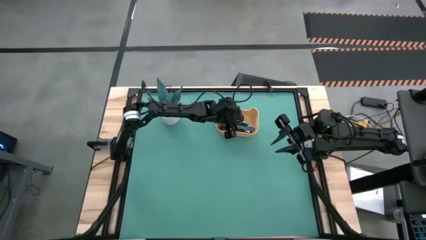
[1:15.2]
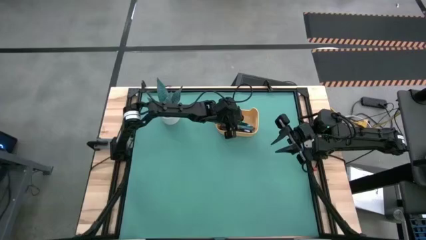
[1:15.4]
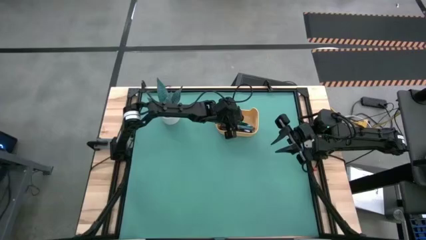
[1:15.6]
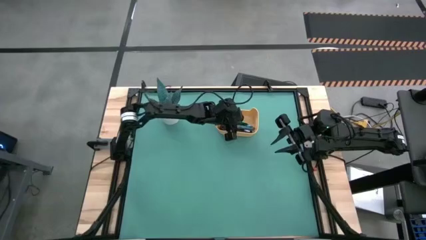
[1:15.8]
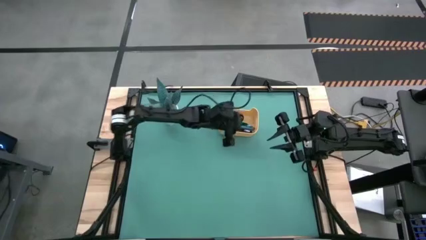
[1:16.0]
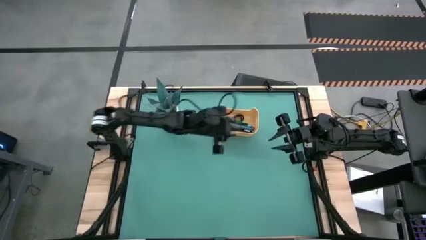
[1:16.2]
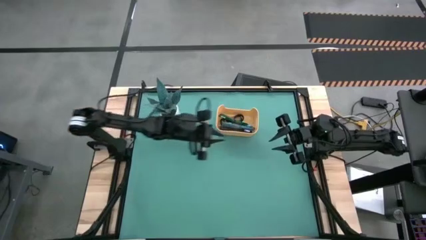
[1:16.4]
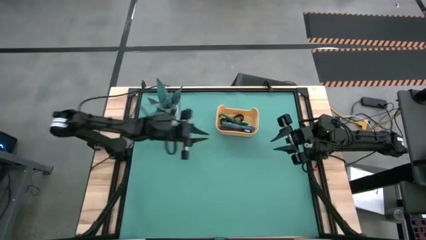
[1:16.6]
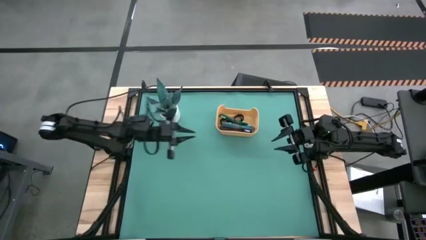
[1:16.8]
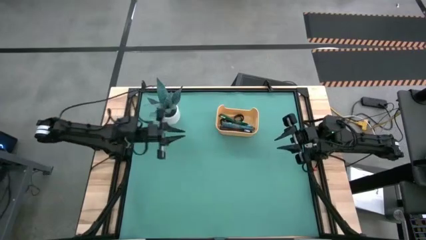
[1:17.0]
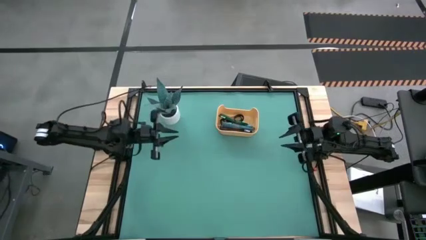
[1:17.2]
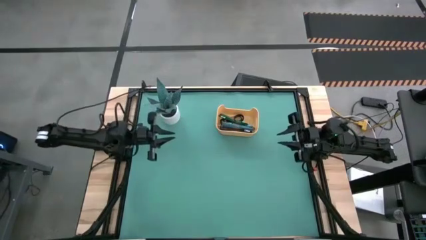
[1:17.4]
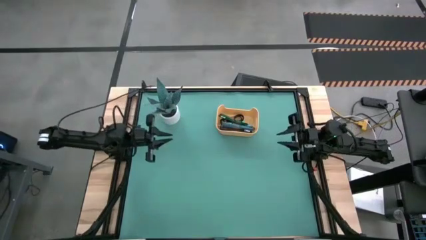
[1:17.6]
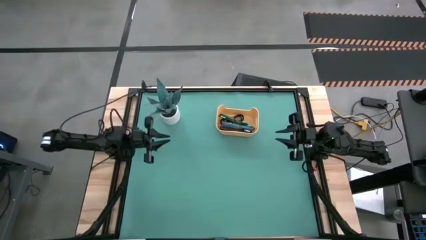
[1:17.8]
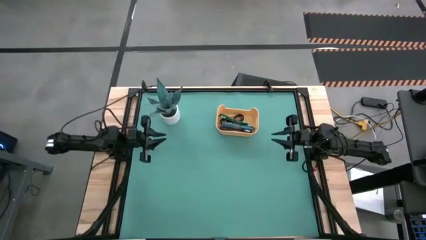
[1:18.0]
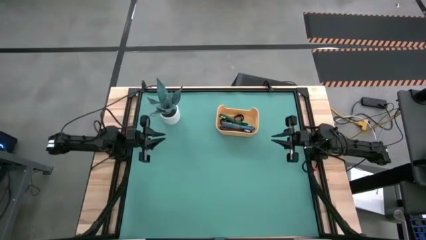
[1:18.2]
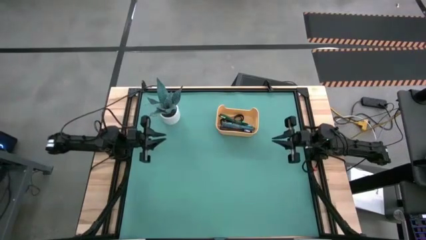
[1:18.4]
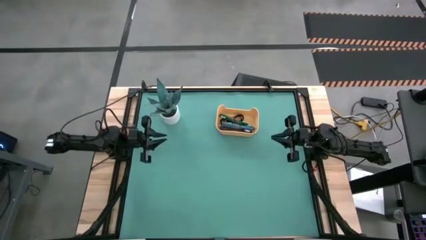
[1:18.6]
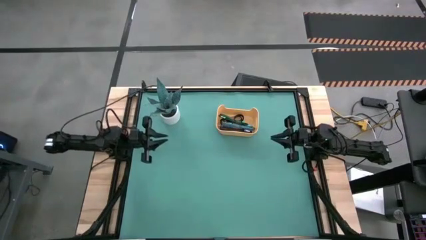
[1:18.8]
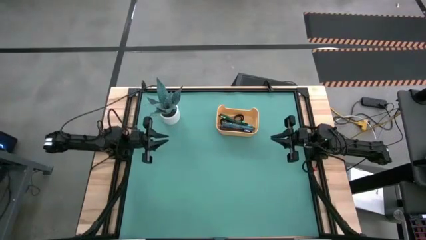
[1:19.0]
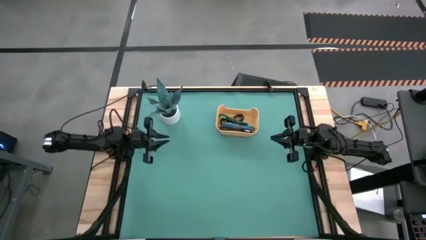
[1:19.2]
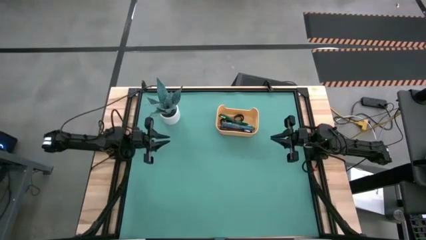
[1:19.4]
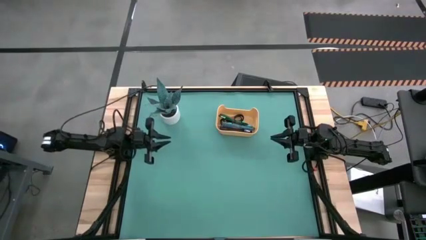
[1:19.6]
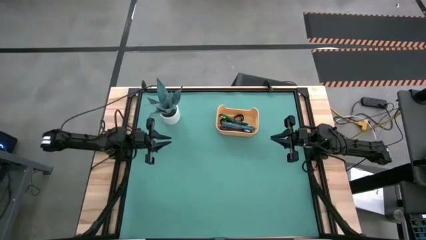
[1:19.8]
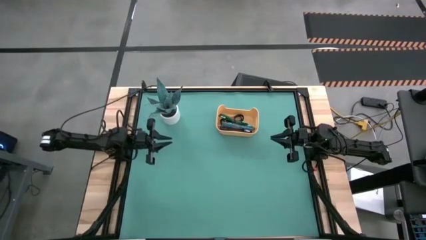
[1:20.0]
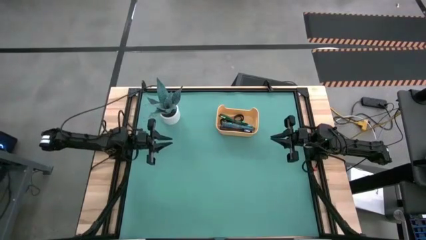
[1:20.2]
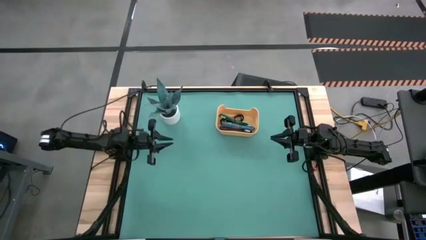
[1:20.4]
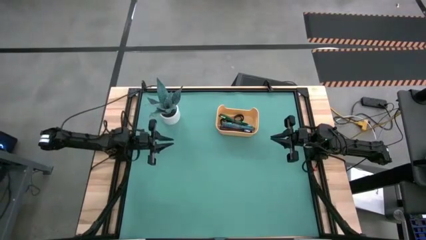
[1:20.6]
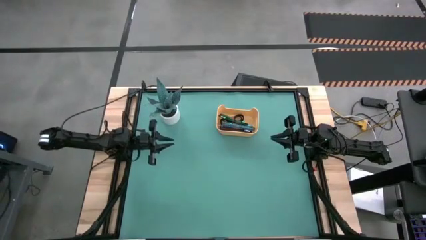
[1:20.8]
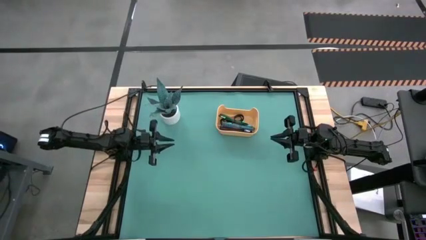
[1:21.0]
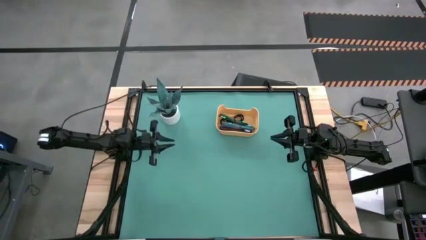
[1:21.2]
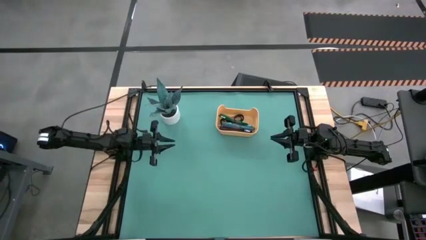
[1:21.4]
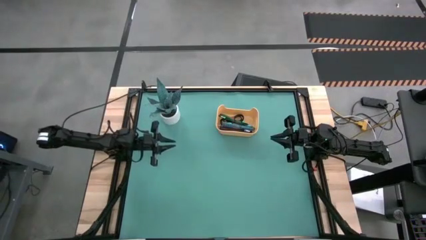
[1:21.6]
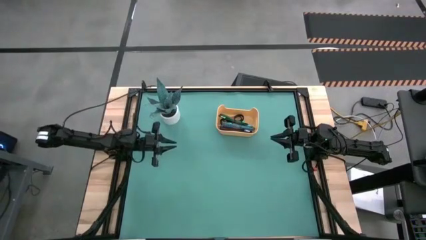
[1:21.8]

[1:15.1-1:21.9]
Task: Pick and place USB-C Cables
Return to Home Position

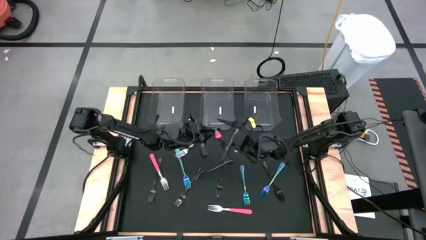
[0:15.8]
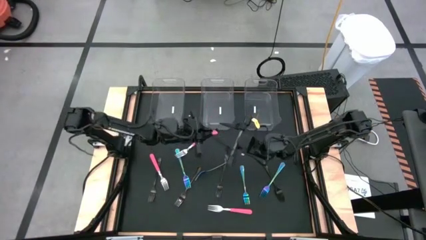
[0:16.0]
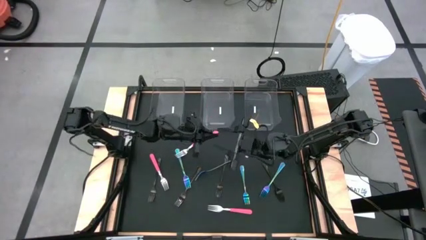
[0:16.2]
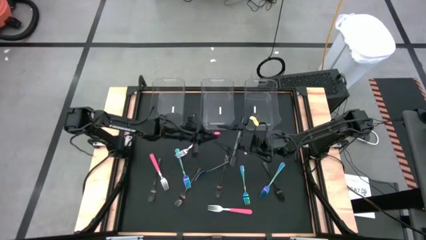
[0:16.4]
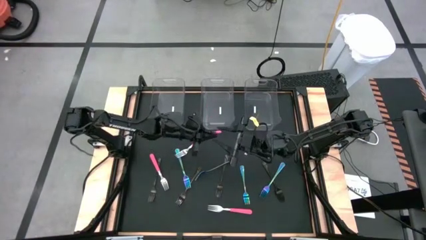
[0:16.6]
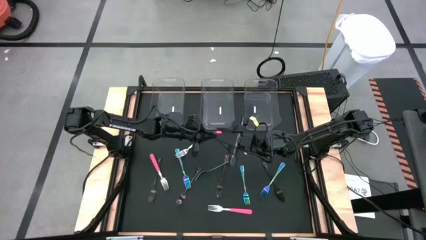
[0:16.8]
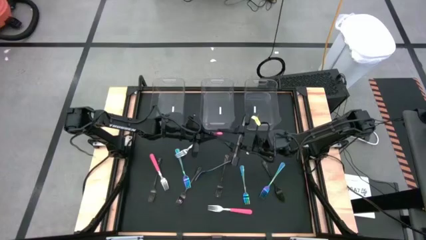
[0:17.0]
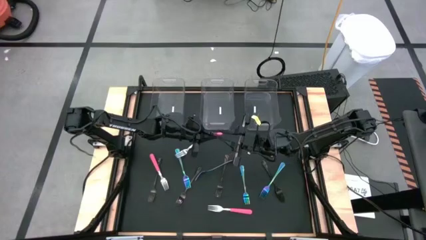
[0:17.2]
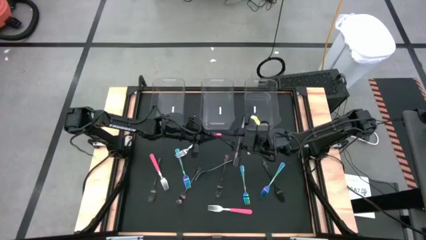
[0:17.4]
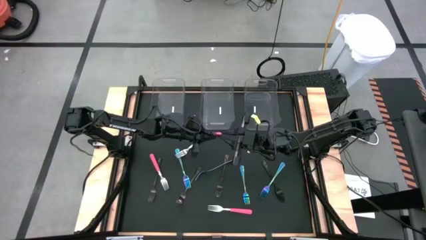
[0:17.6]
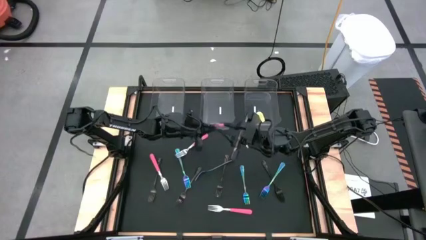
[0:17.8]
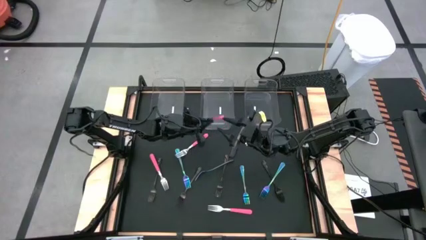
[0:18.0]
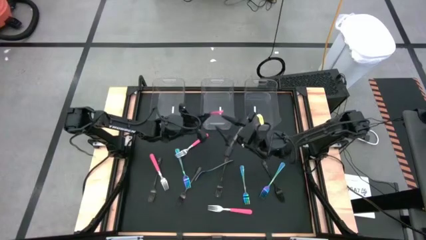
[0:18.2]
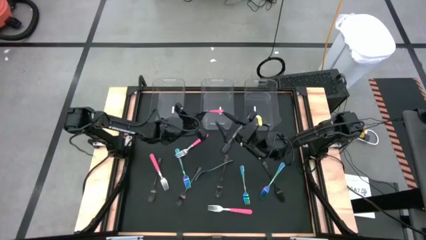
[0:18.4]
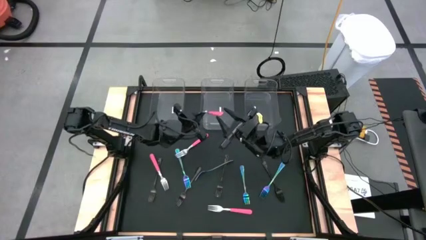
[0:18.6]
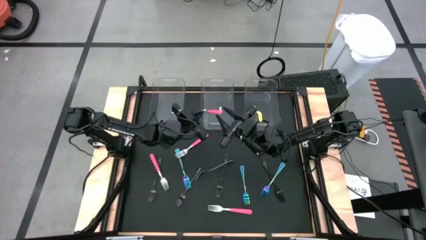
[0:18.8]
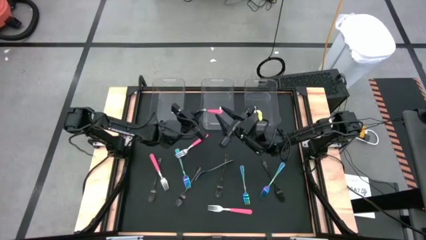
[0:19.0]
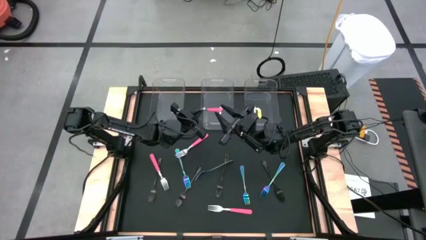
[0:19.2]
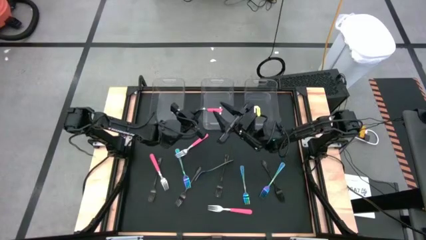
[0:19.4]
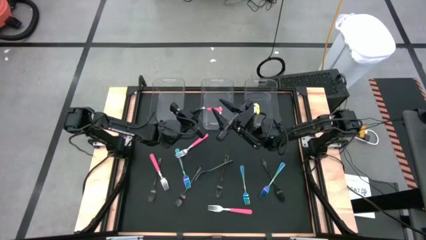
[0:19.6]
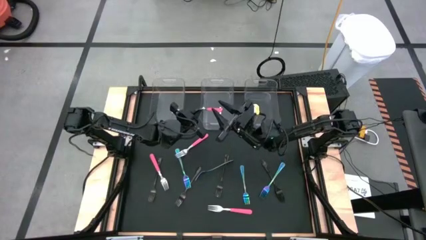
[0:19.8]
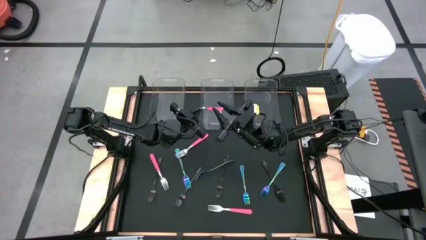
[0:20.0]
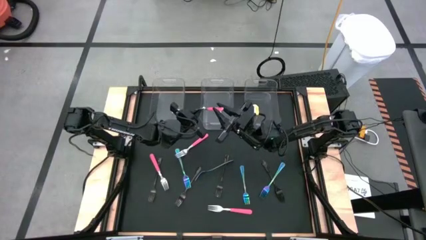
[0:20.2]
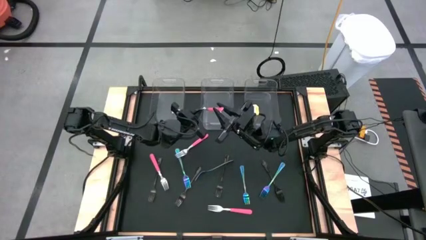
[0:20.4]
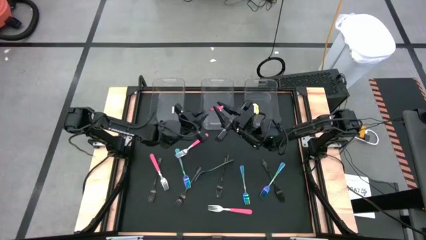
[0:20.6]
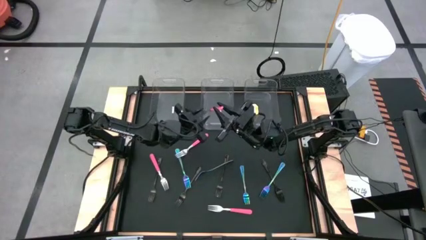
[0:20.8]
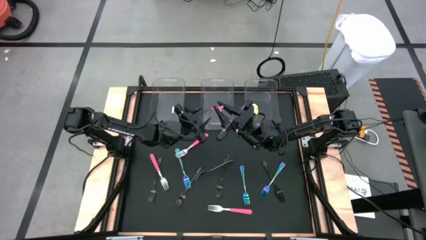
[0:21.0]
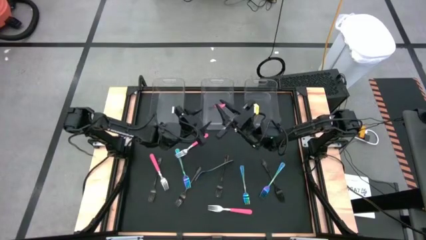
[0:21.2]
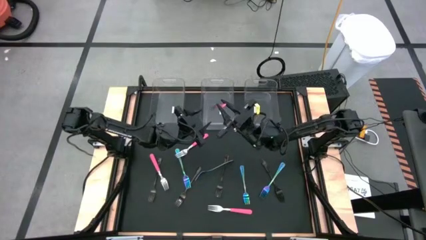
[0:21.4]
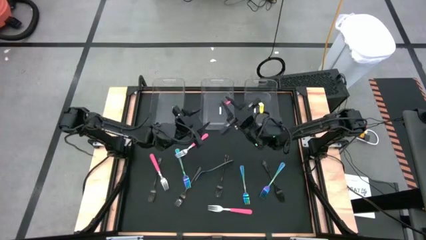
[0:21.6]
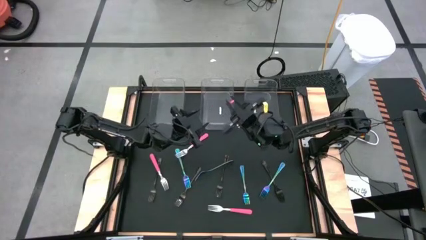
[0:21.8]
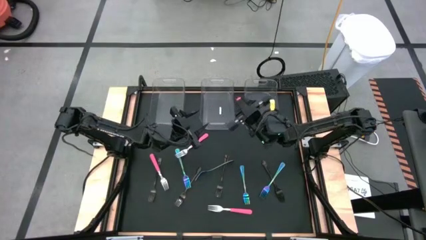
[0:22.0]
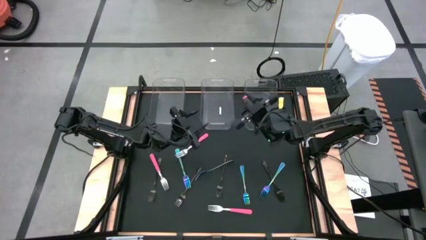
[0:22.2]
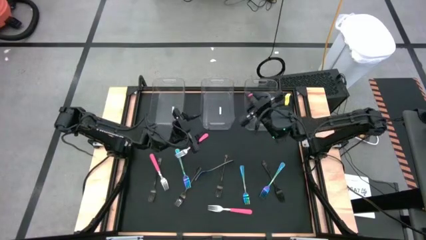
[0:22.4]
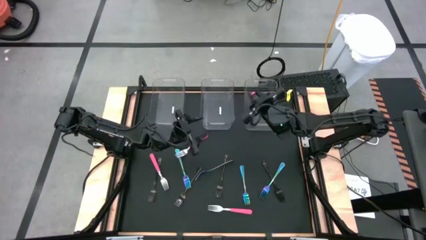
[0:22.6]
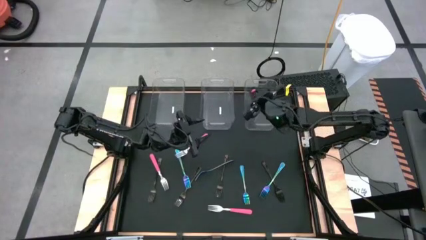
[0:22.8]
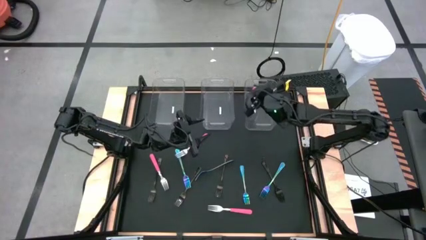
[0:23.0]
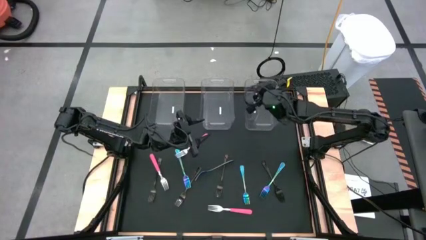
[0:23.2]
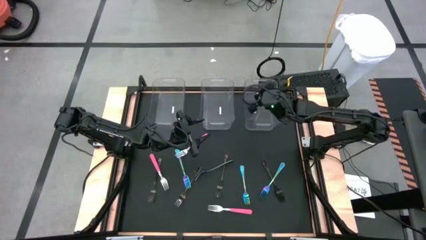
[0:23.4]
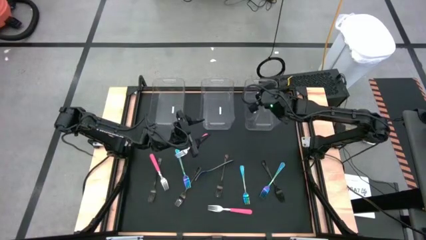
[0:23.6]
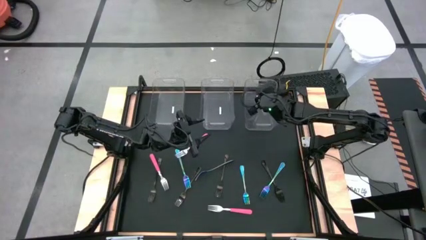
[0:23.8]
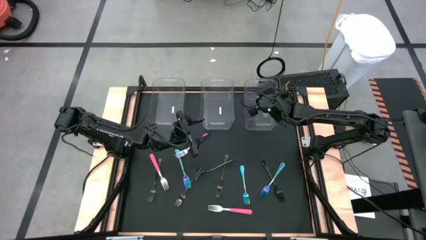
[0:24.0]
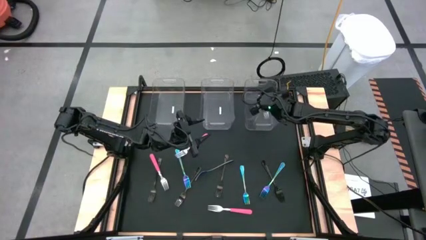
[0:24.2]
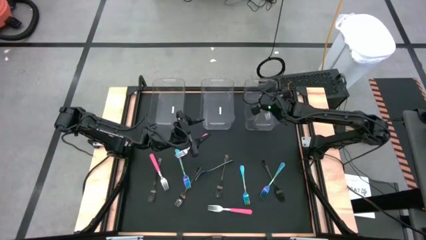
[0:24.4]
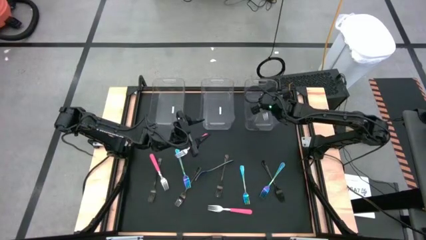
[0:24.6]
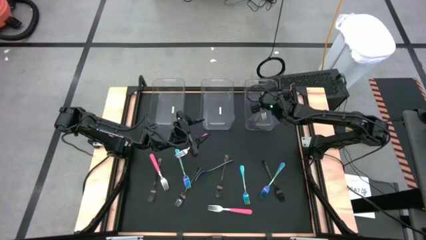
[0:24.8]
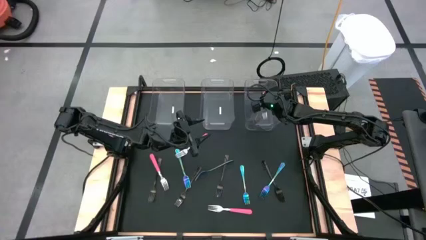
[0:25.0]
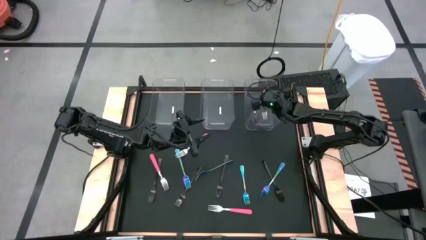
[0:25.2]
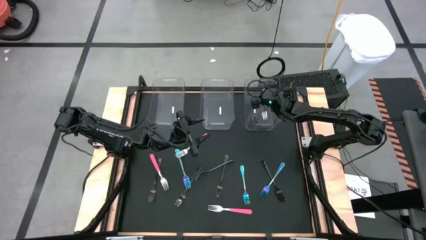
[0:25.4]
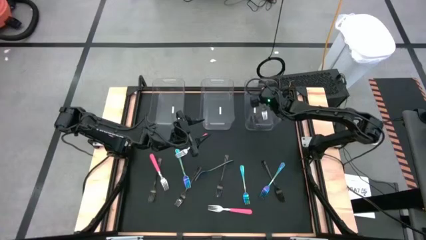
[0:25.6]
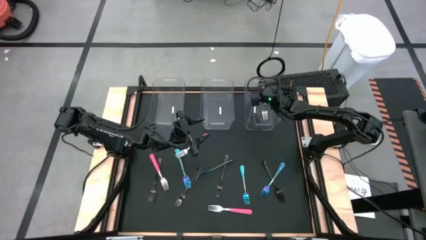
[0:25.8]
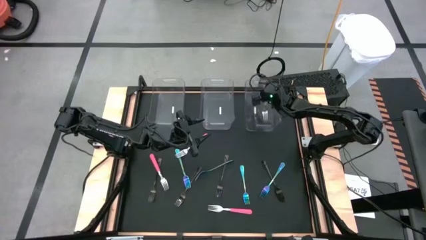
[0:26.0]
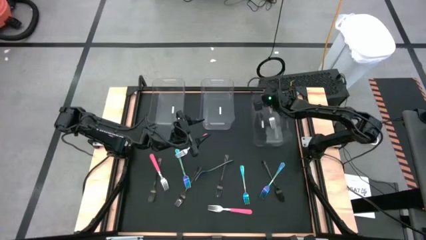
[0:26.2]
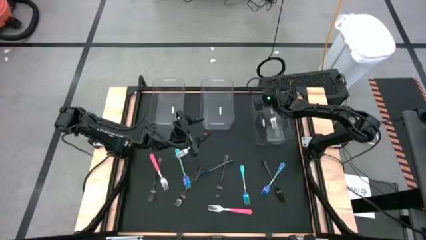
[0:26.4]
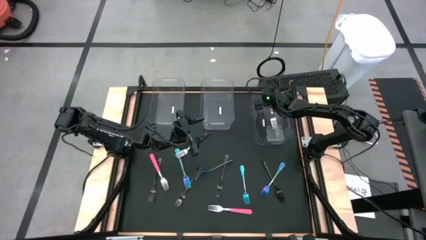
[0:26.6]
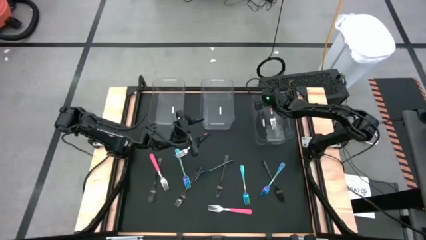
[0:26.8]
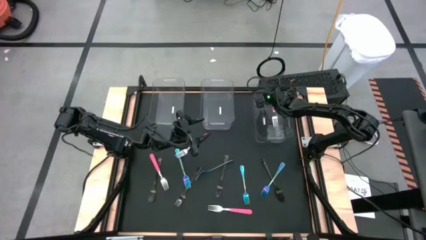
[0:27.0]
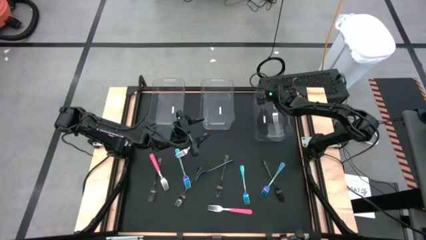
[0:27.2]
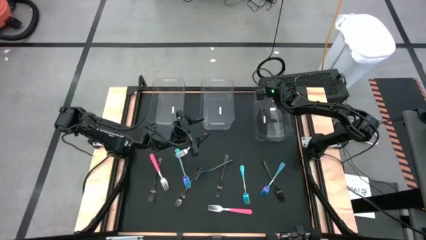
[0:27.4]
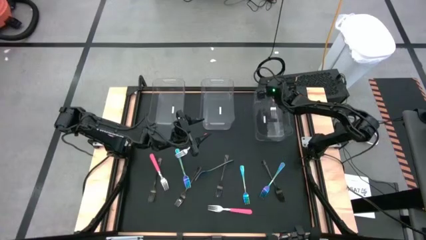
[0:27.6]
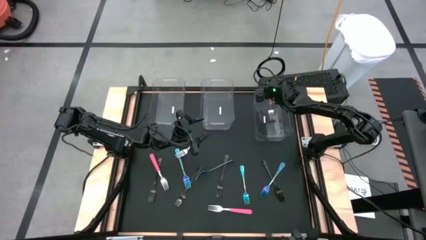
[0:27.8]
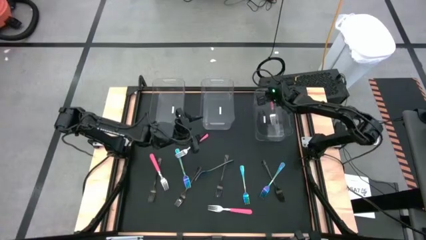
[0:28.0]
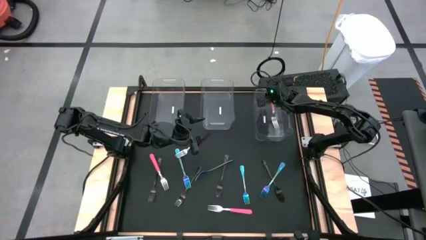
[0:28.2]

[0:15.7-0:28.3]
Task: Sort silverware by color (type)
Put the pink fork into the right transparent bin
